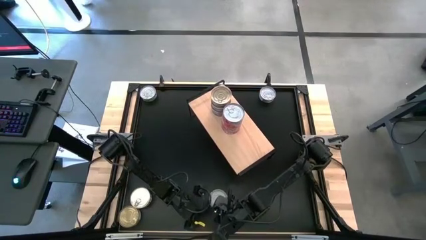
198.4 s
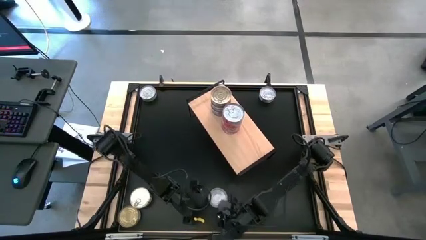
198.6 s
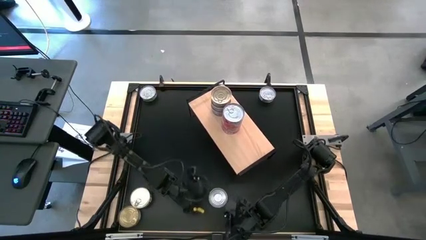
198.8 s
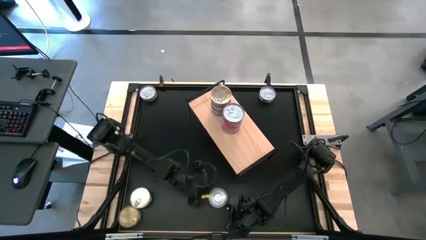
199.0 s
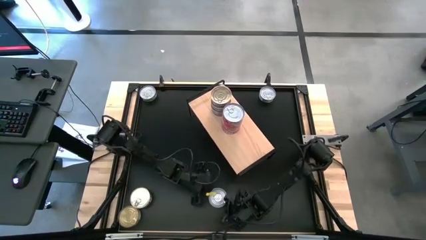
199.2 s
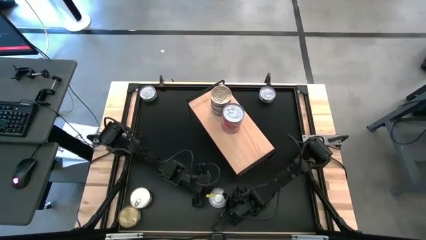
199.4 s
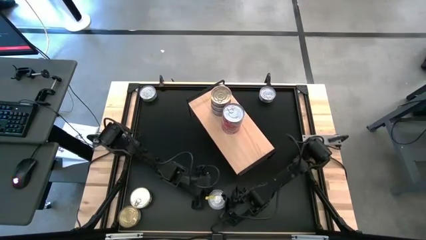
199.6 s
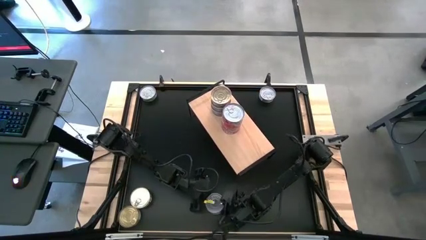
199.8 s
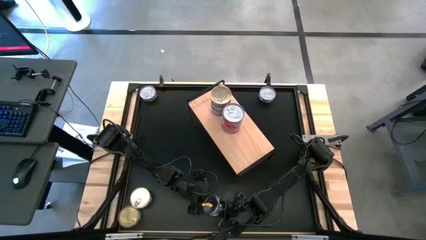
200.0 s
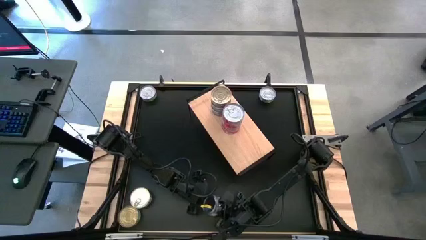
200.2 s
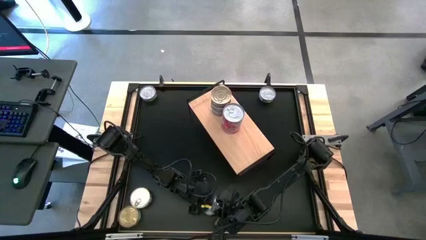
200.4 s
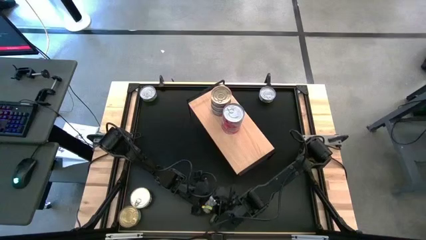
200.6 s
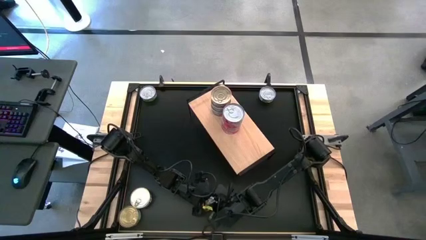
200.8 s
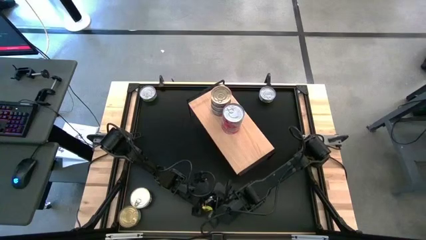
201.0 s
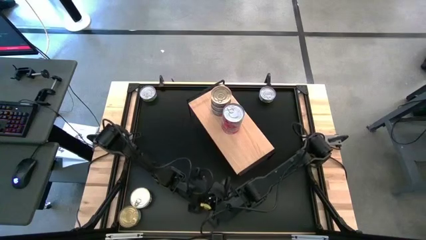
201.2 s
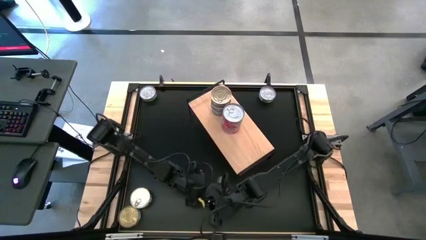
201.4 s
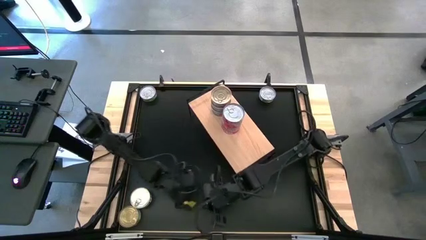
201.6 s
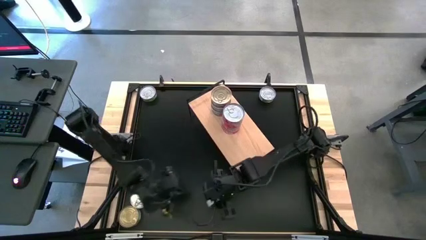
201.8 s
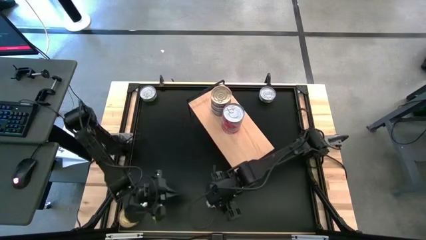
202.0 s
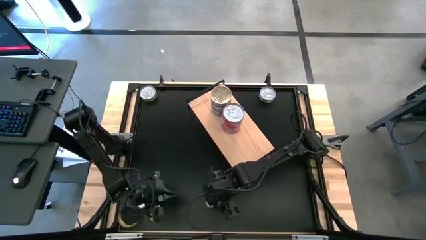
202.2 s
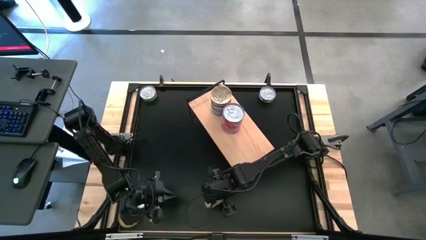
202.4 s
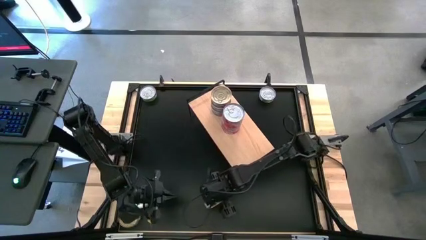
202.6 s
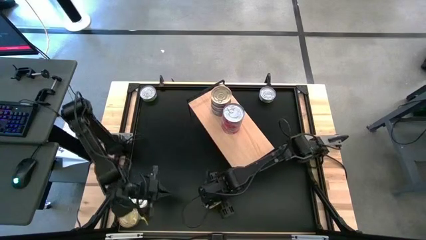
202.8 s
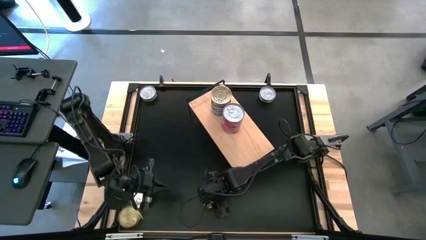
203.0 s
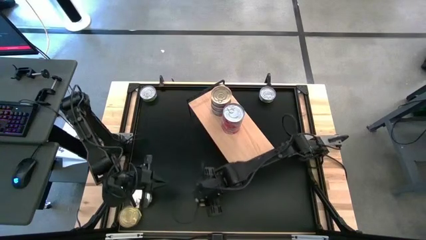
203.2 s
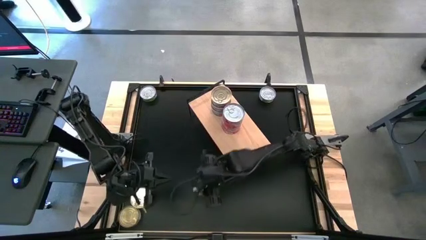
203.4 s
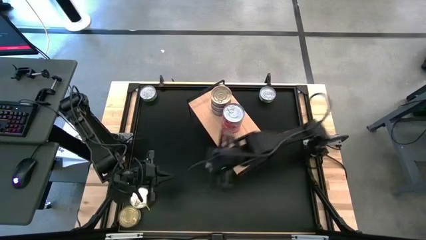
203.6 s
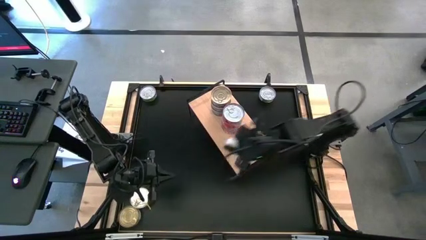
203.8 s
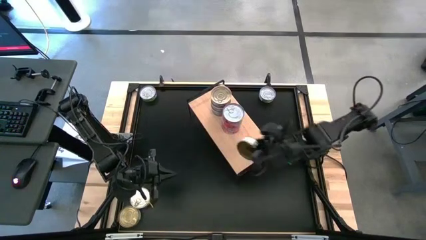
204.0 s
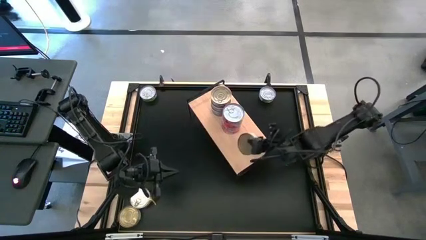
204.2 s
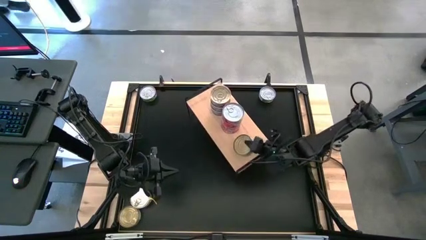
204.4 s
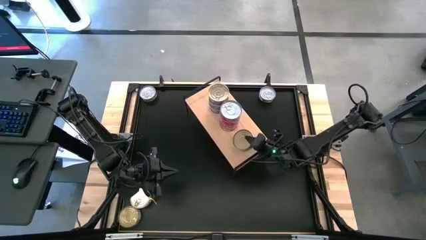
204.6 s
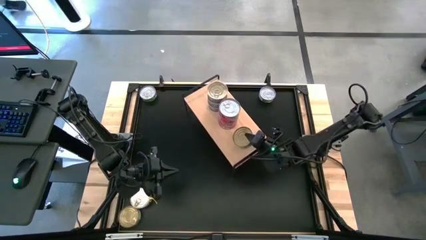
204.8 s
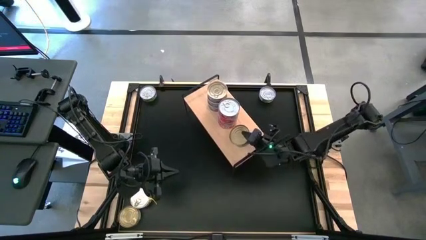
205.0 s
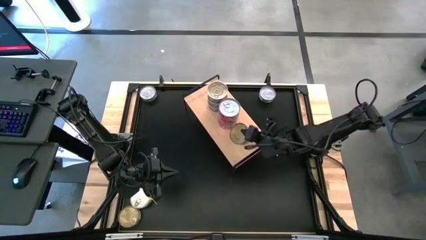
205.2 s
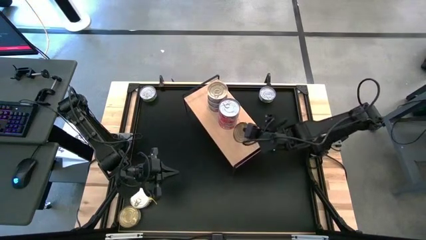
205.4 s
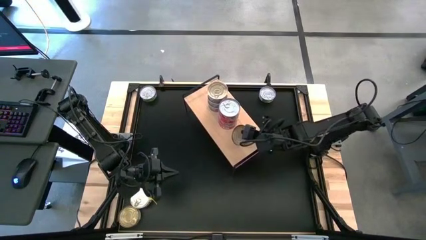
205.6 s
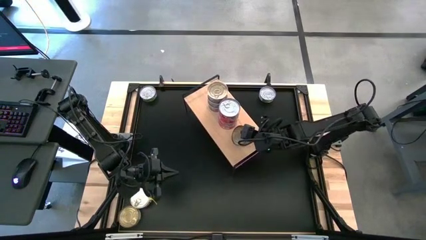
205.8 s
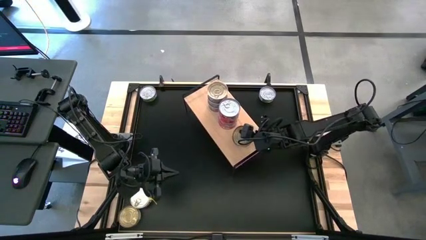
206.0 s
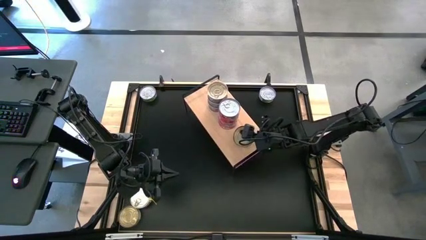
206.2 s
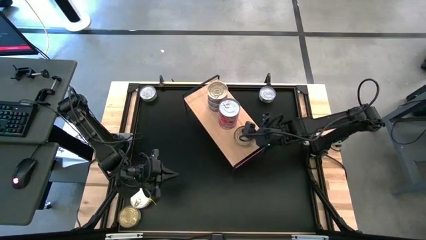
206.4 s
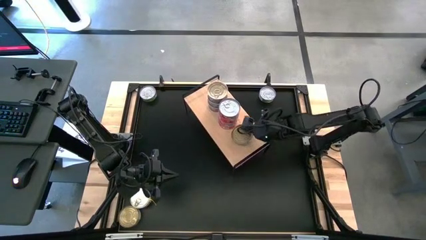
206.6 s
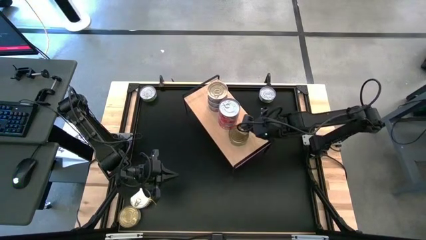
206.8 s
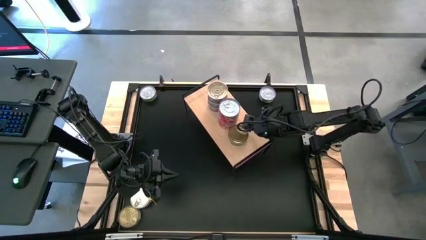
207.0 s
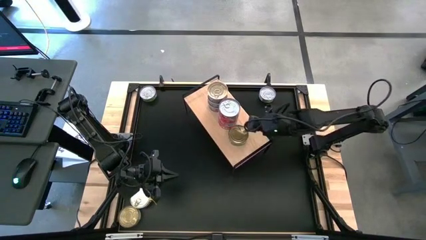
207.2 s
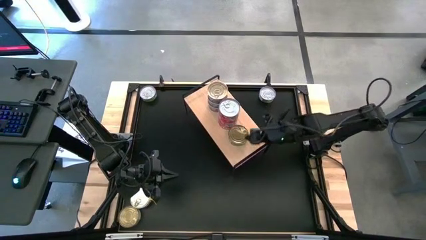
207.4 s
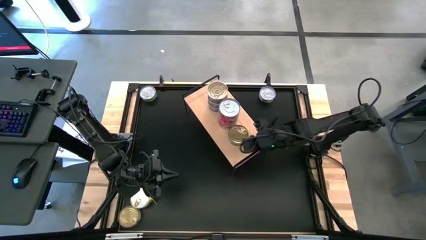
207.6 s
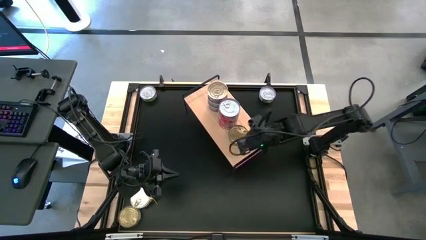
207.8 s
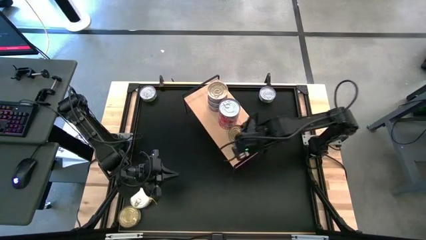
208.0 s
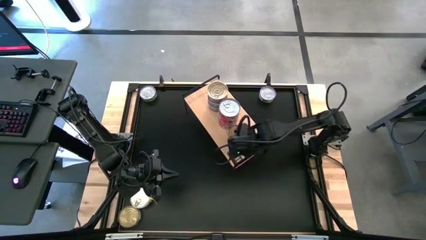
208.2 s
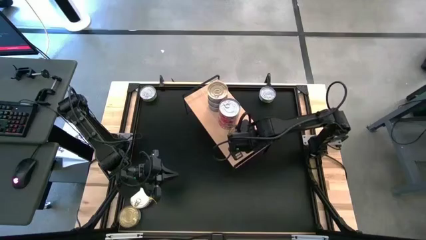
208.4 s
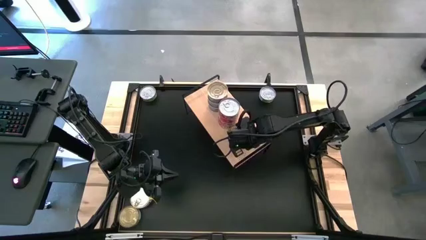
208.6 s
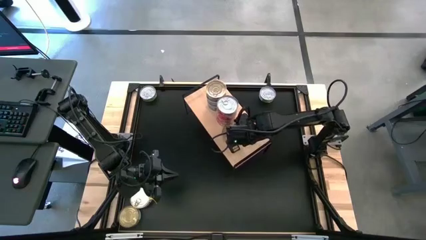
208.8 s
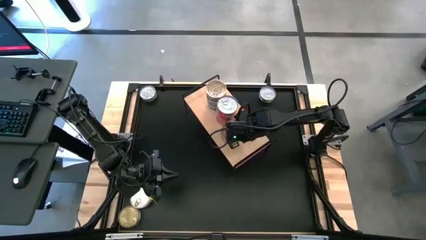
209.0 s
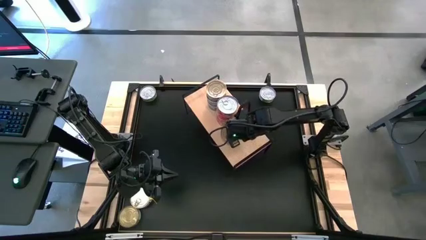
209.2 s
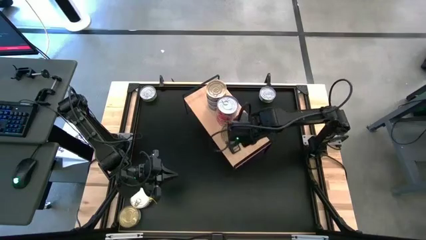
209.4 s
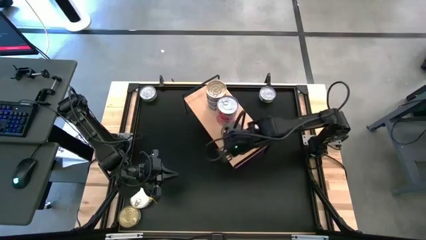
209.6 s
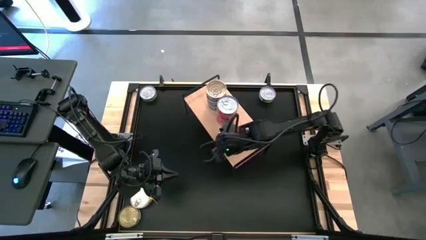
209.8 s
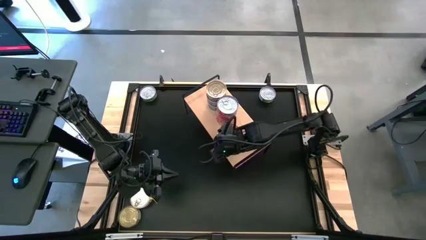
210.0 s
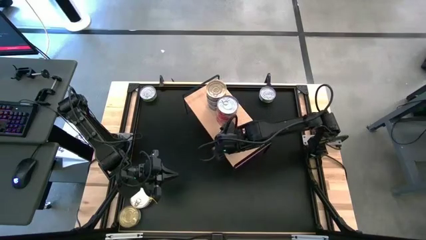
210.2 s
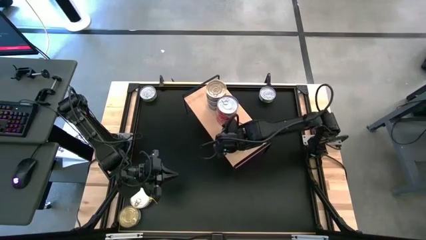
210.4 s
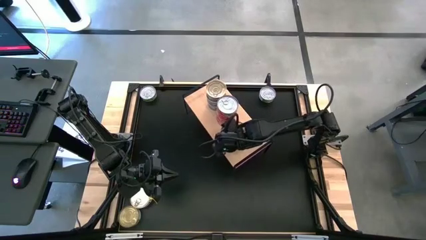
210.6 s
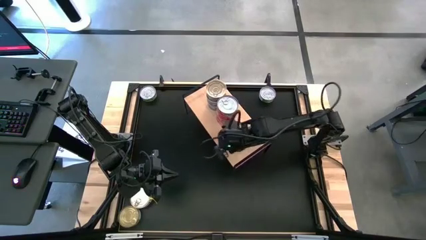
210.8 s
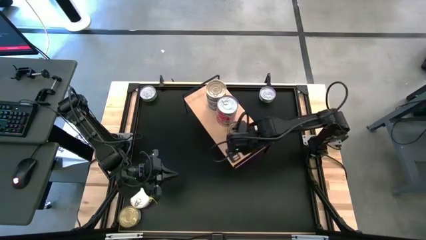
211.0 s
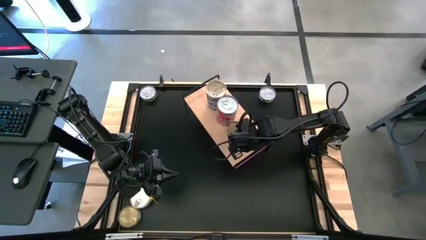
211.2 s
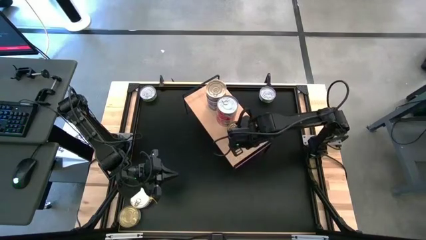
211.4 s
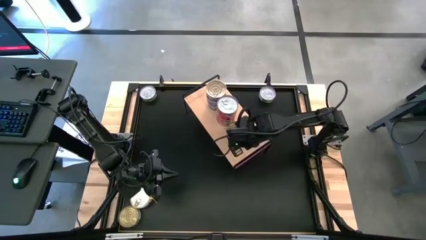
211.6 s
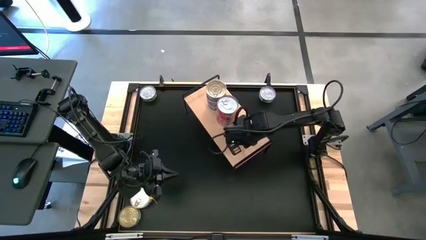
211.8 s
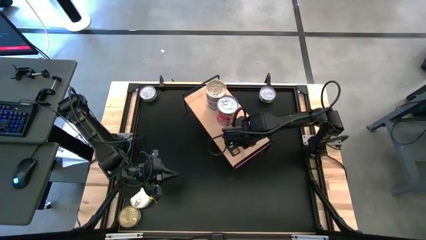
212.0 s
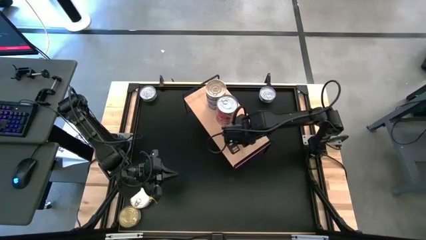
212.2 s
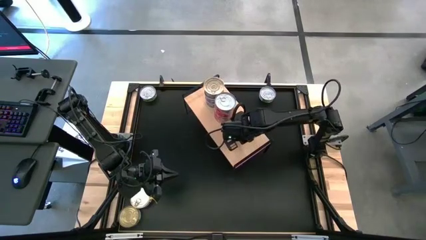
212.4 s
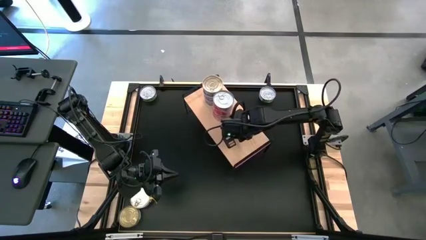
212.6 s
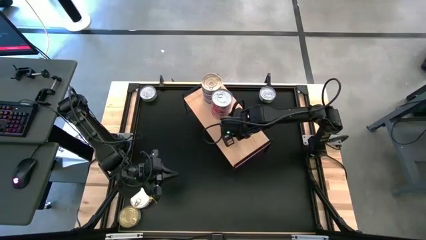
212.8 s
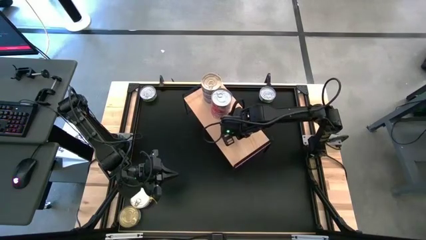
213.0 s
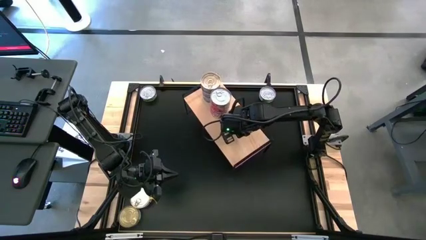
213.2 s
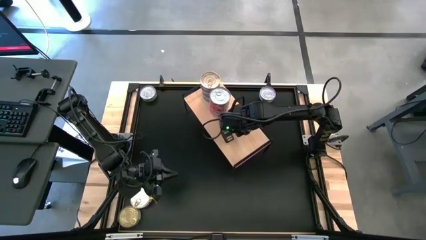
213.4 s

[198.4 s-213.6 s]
Task: Stack canned seafood by type on shelf
Put the green tuna can on the shelf
